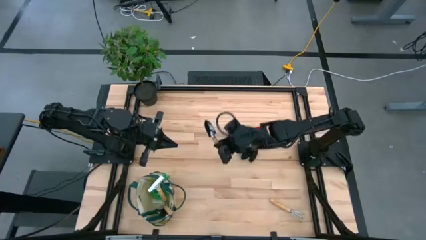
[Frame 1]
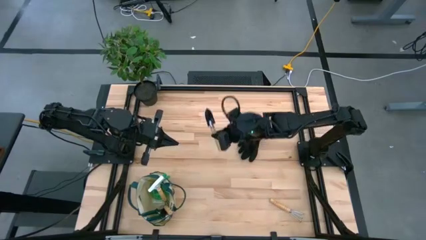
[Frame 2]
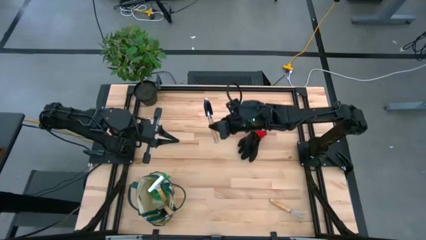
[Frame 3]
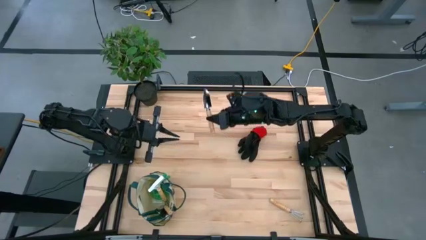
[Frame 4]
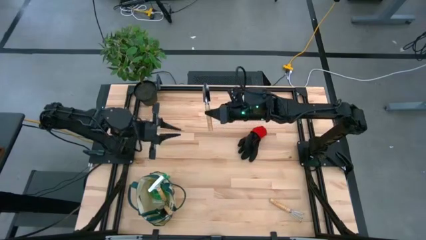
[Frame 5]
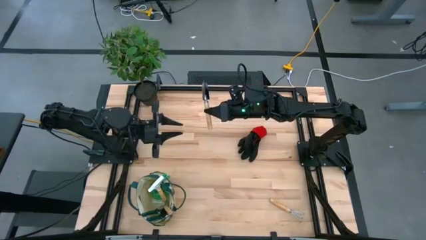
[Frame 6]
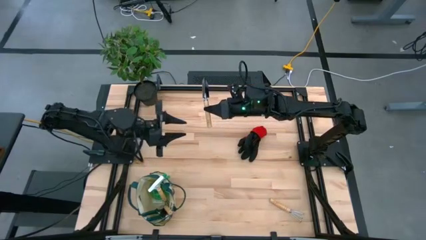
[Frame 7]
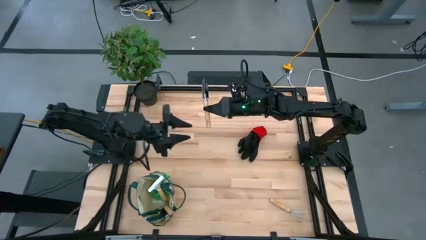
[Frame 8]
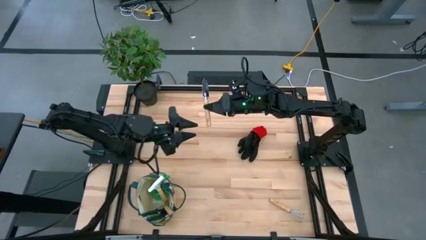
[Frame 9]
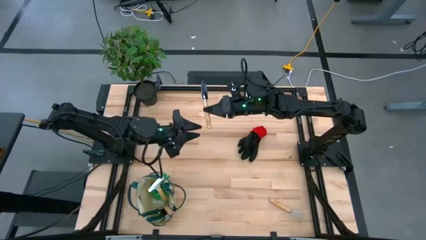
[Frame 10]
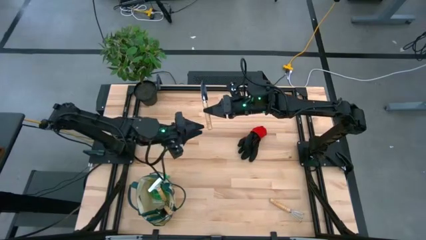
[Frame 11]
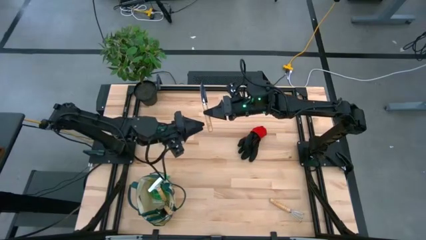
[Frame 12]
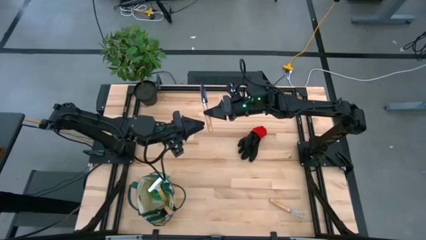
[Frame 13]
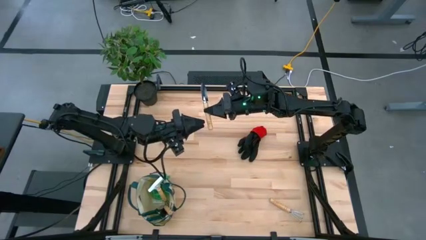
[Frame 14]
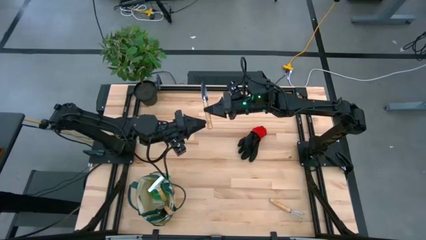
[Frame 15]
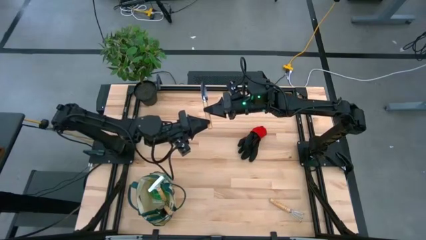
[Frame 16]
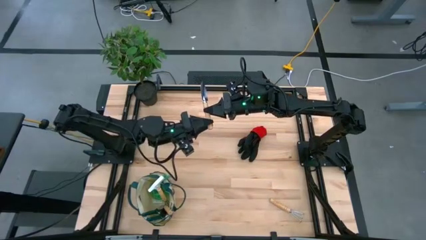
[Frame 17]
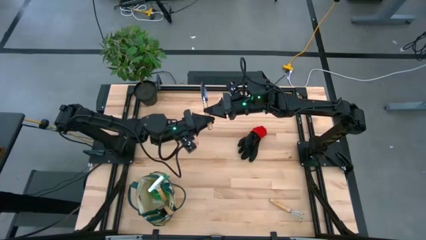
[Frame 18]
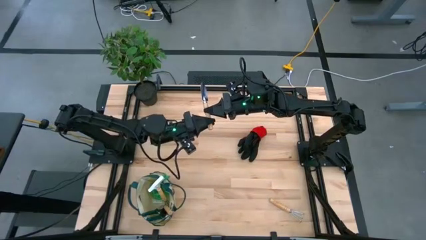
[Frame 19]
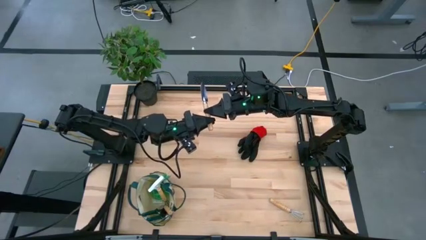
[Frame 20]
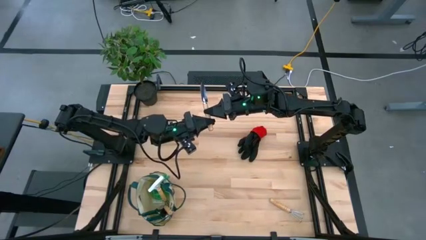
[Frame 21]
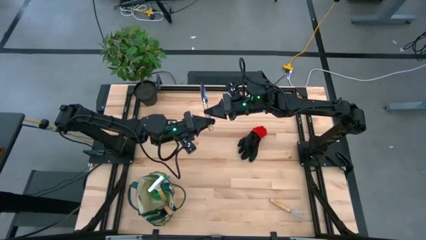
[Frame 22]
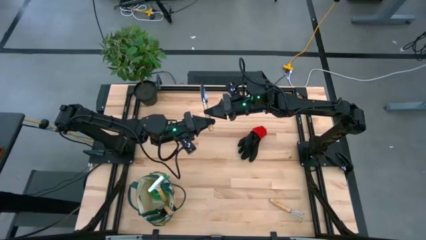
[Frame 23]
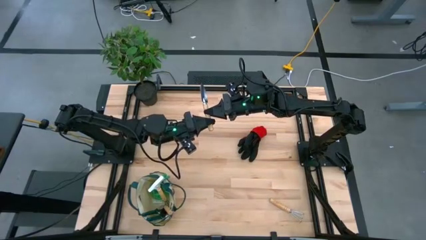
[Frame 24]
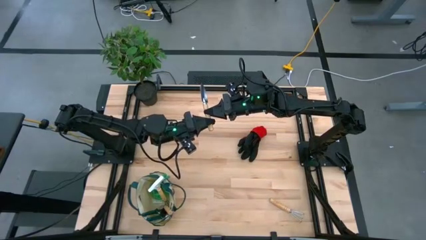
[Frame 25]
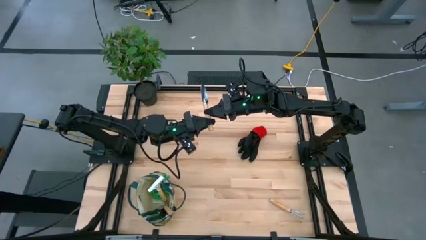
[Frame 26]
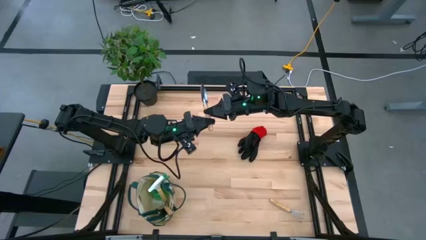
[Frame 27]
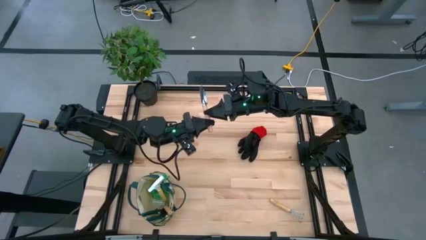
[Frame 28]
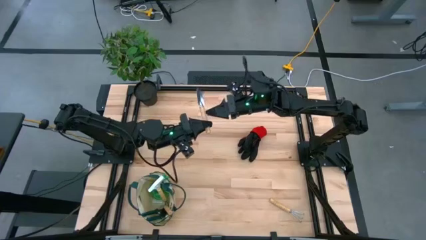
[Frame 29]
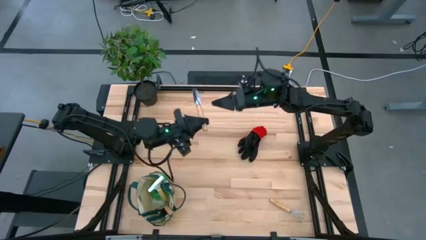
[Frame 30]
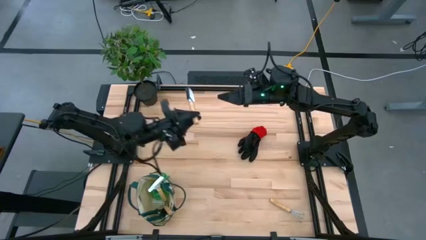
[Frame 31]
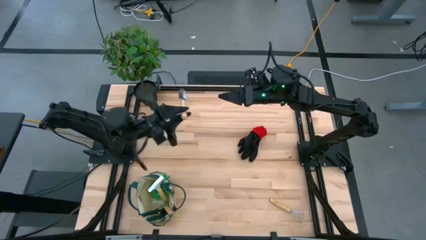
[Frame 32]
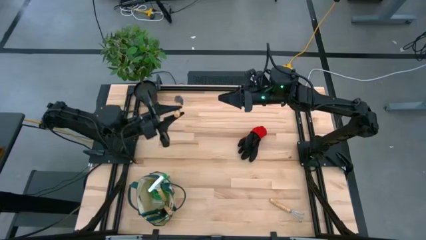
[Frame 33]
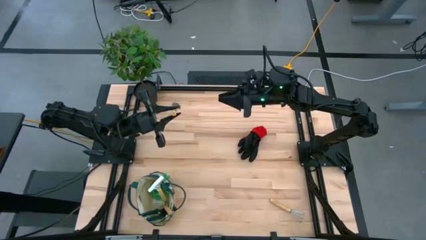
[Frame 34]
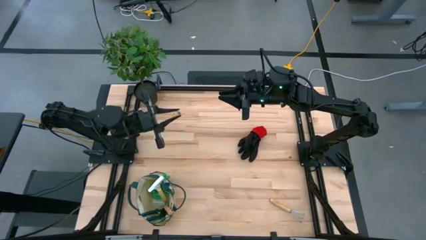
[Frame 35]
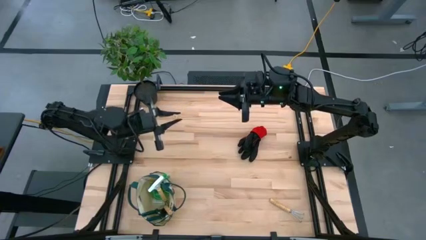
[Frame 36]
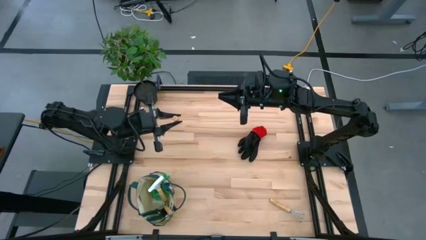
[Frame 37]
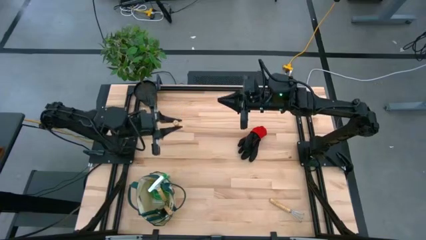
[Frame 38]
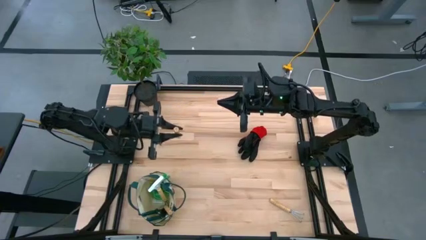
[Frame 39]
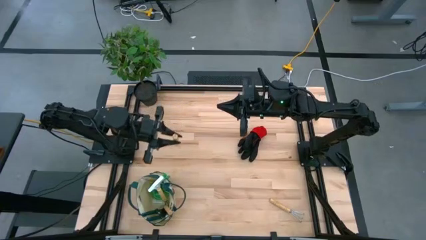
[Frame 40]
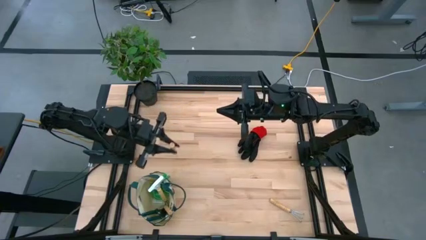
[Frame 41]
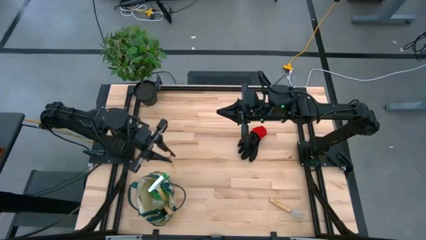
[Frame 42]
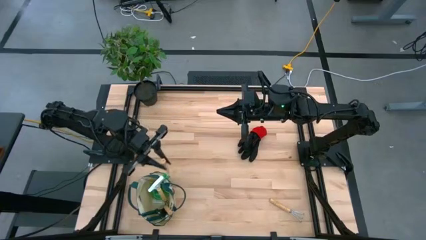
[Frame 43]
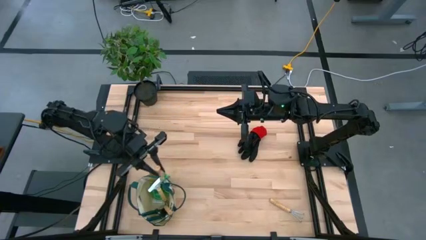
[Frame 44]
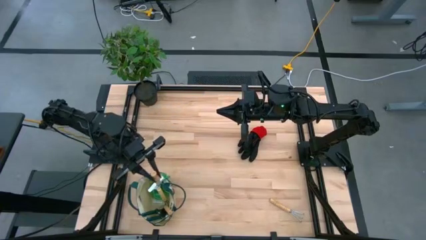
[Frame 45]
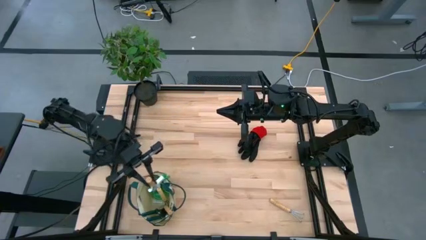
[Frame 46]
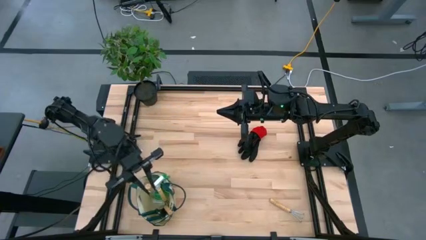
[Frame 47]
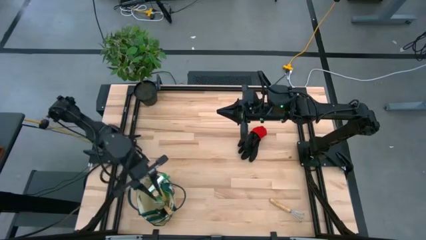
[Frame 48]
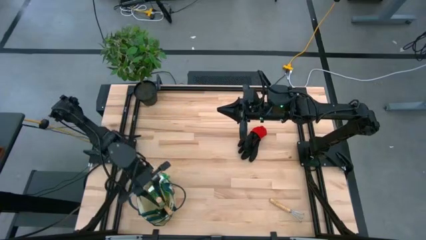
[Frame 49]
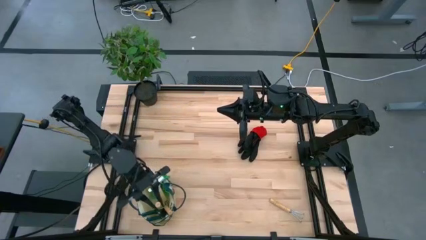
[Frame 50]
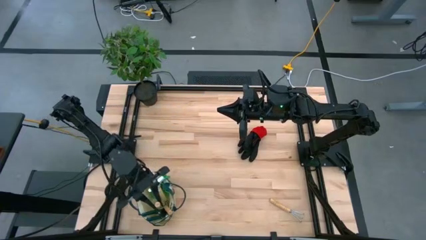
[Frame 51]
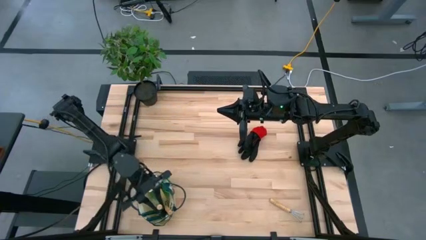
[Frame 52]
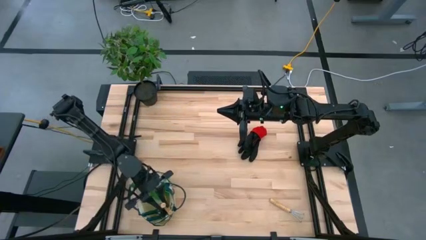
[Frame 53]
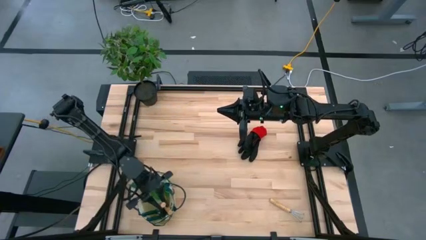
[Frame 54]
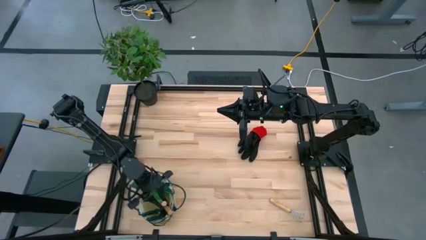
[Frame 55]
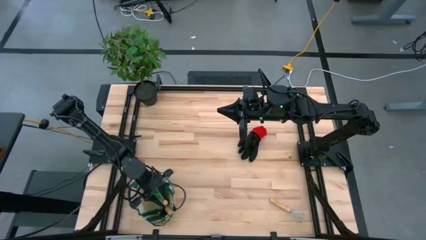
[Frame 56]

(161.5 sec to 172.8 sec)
Task: Pick & Place Garden tools in Gardening bag
Put the trowel into the gardening bag
